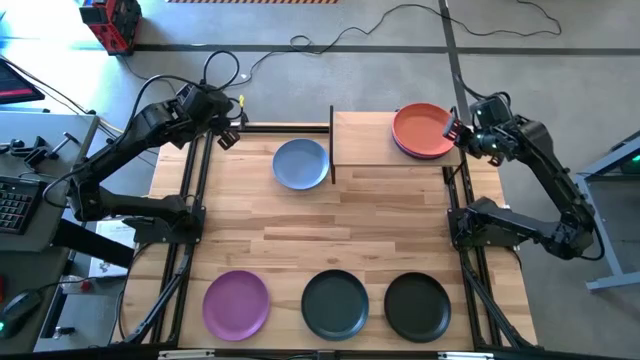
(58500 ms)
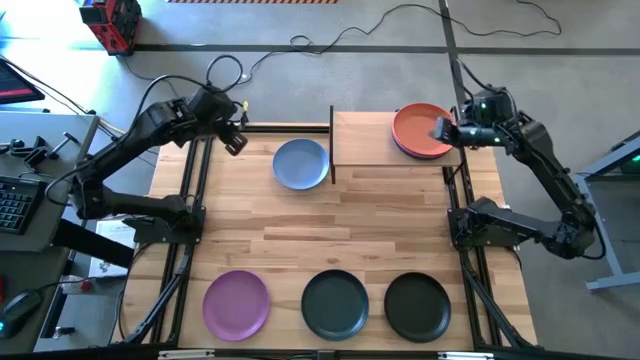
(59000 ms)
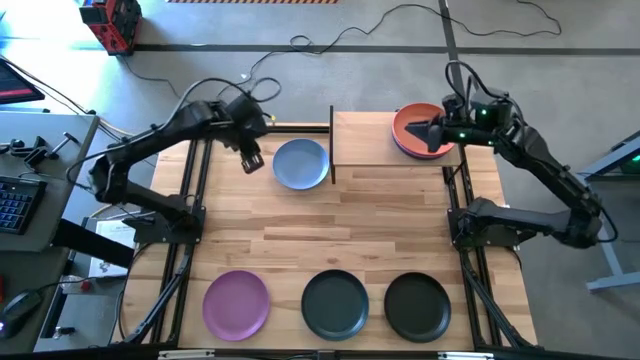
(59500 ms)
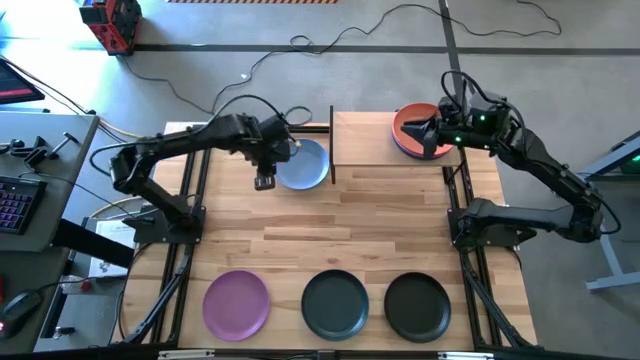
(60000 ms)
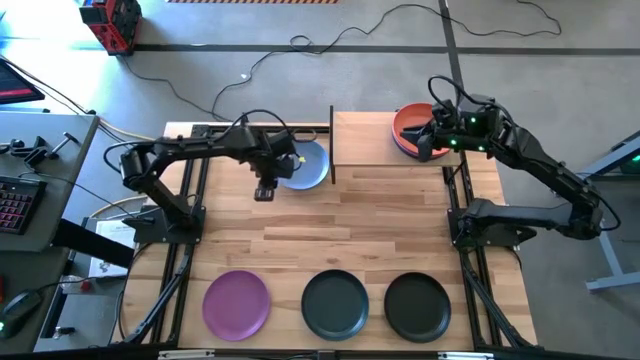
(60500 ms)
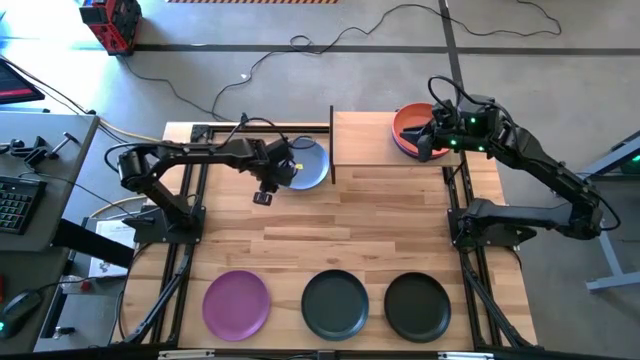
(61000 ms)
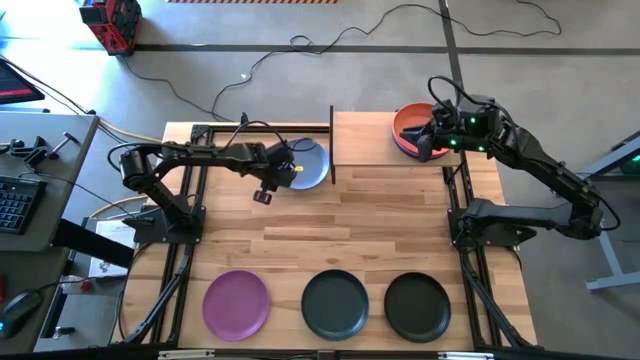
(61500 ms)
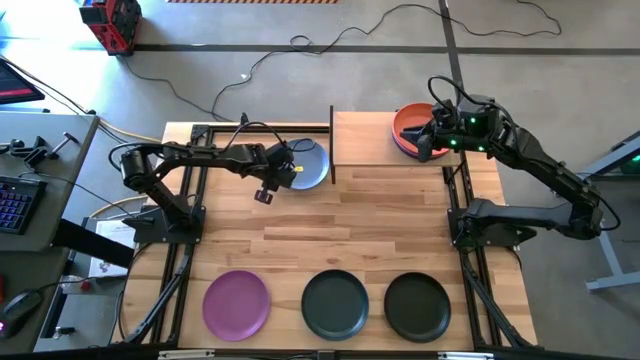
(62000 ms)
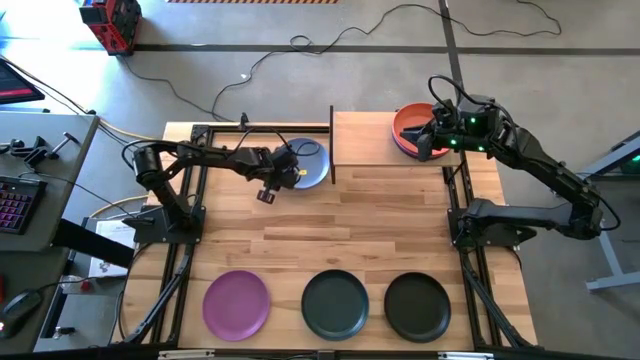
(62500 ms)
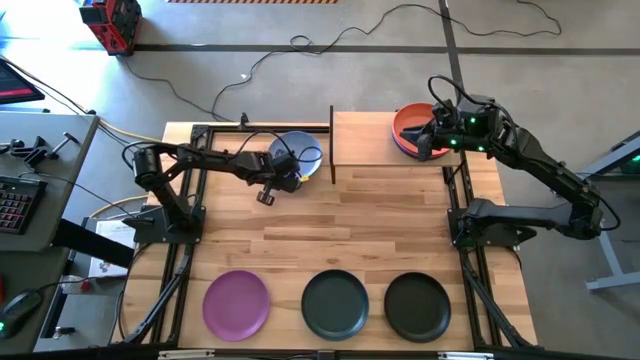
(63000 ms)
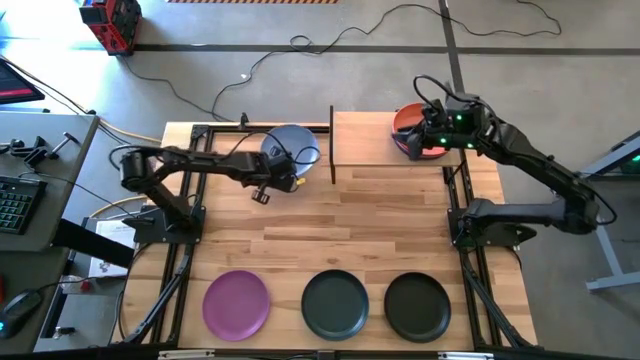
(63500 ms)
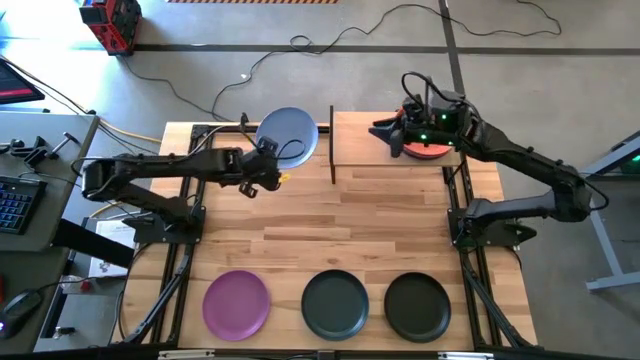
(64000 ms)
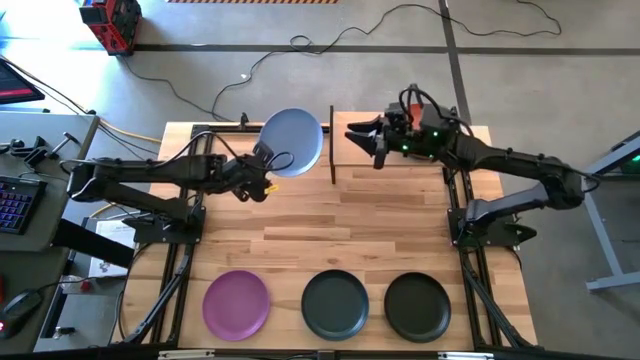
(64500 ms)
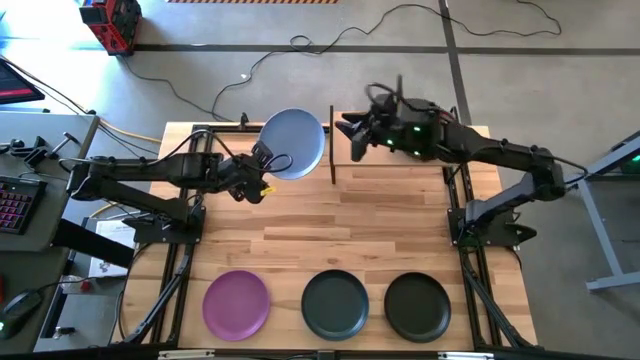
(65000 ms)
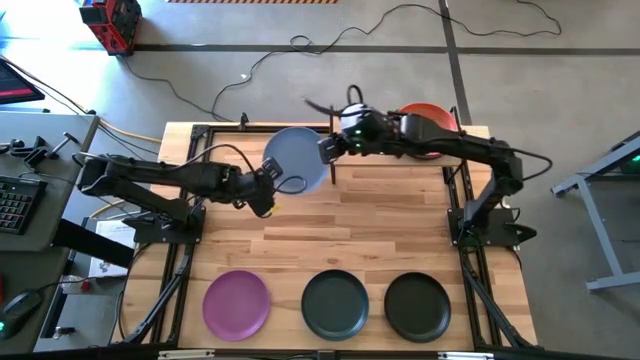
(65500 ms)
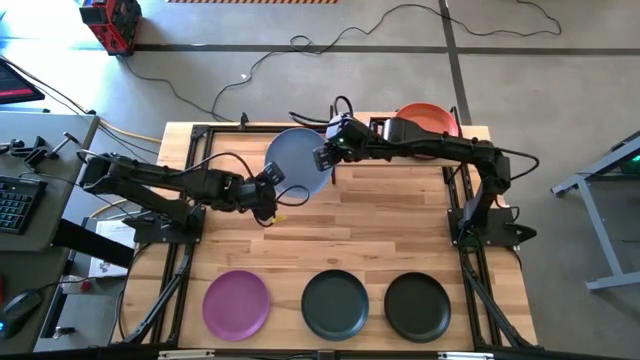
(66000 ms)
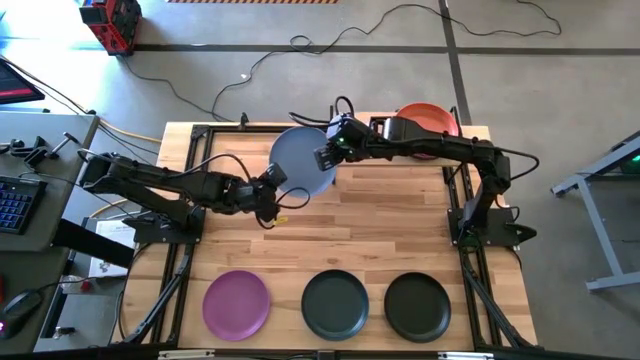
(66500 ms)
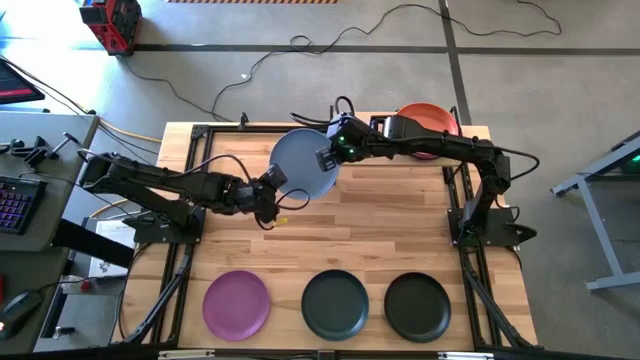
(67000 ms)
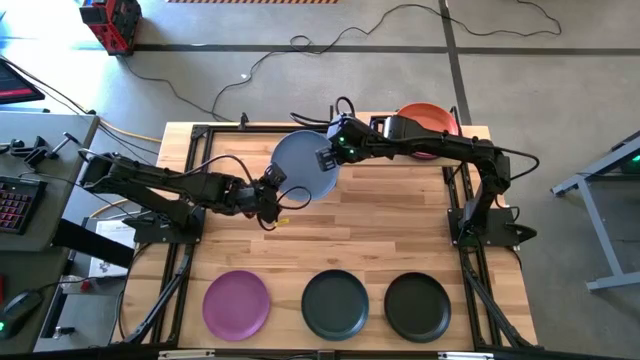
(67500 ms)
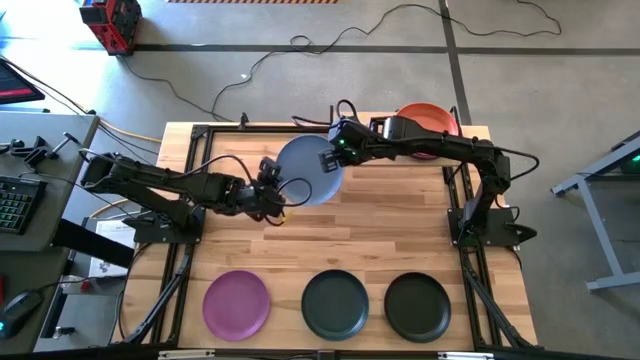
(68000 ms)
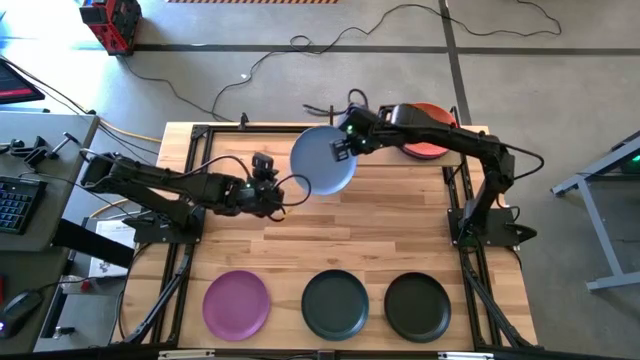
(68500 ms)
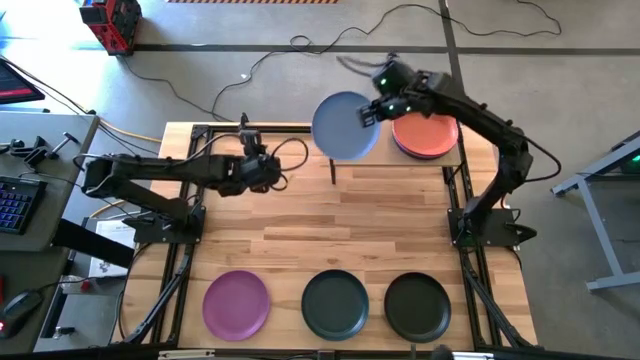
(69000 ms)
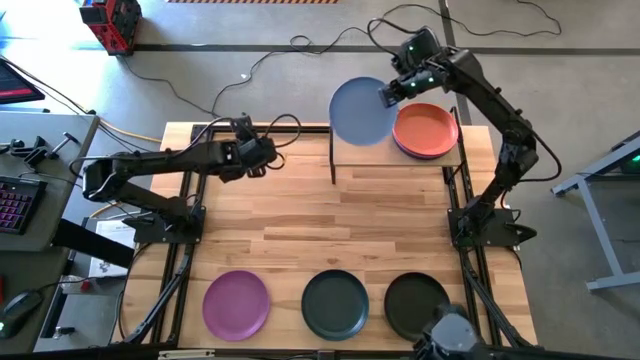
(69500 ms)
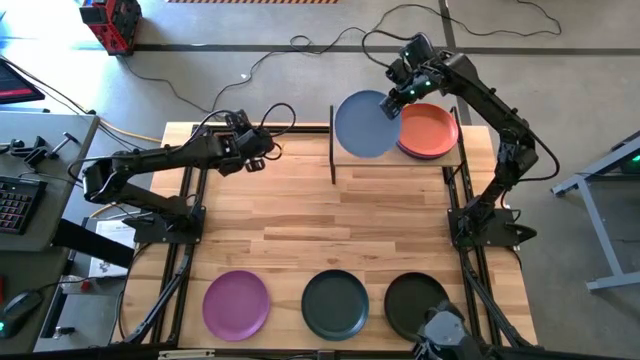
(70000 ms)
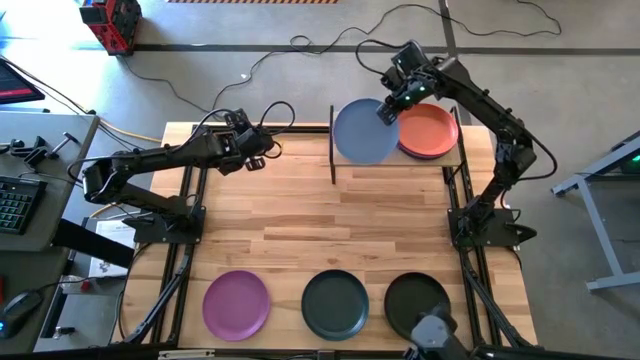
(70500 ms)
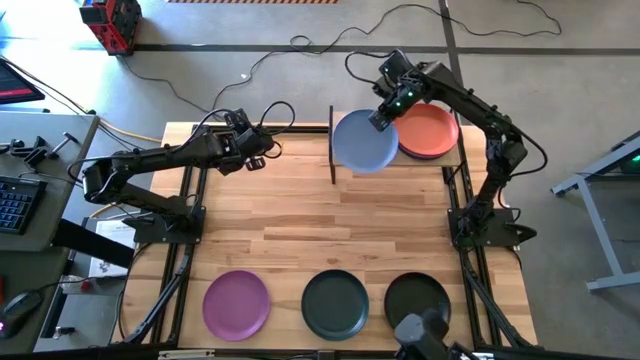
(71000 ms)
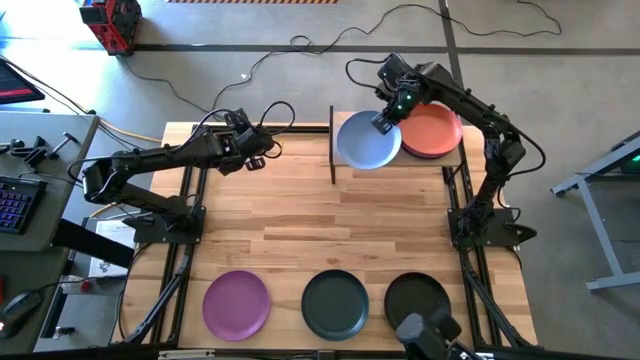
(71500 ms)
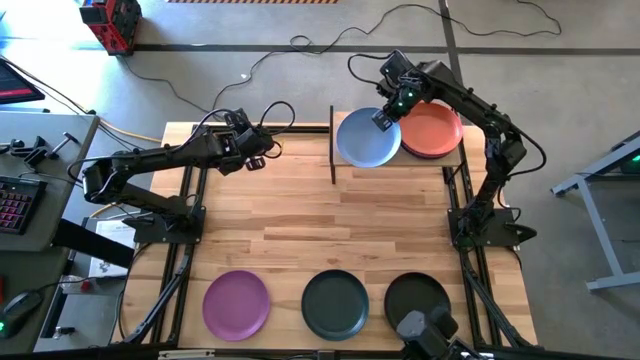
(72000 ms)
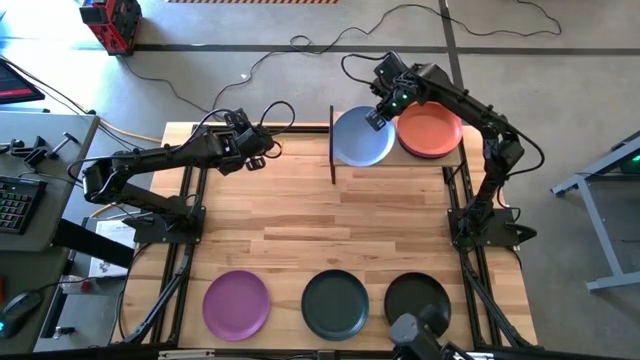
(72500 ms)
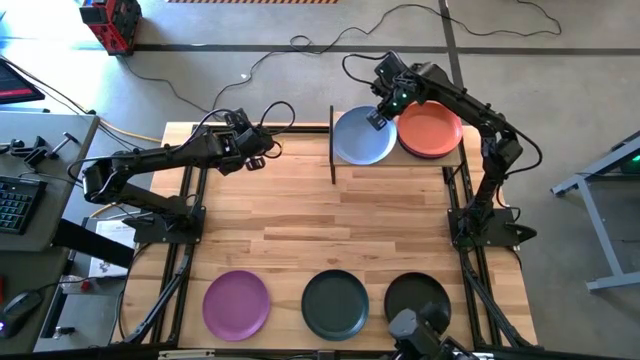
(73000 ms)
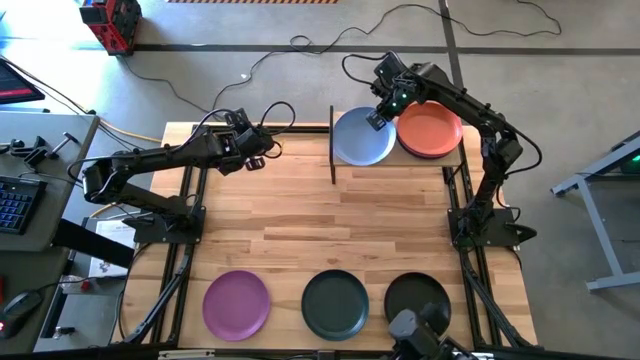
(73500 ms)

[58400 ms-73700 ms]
Task: Place and stack plates onto a shelf
Put the blue plate on the shelf

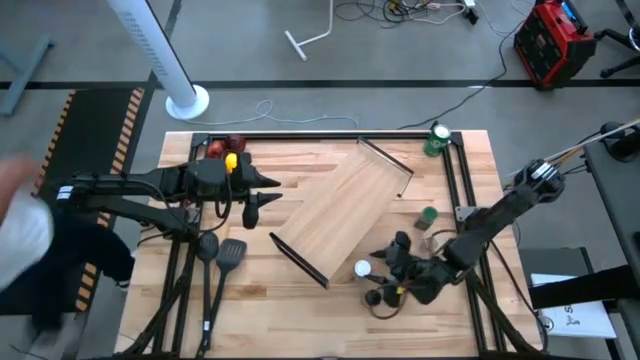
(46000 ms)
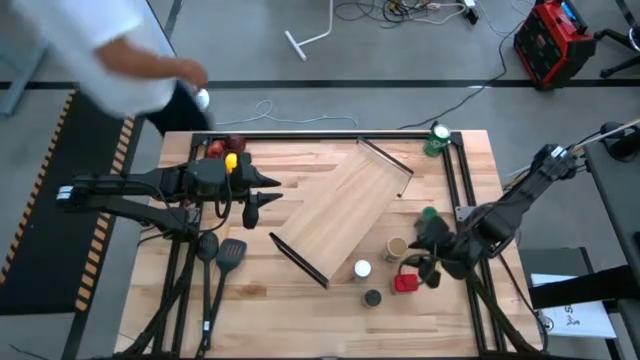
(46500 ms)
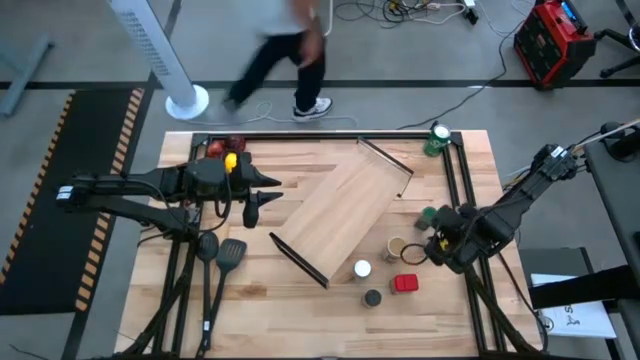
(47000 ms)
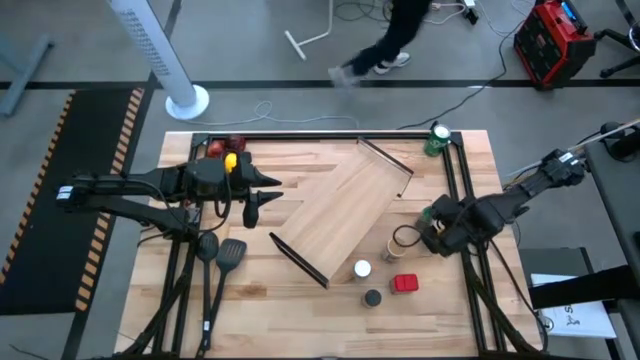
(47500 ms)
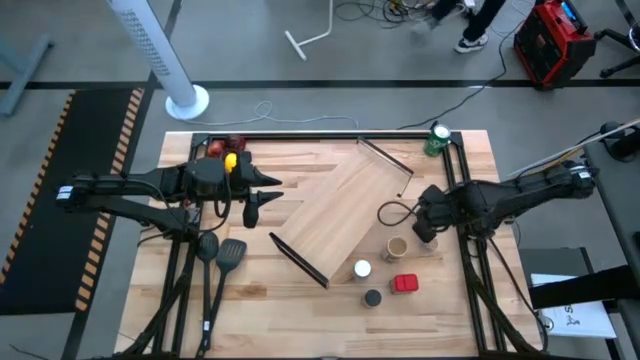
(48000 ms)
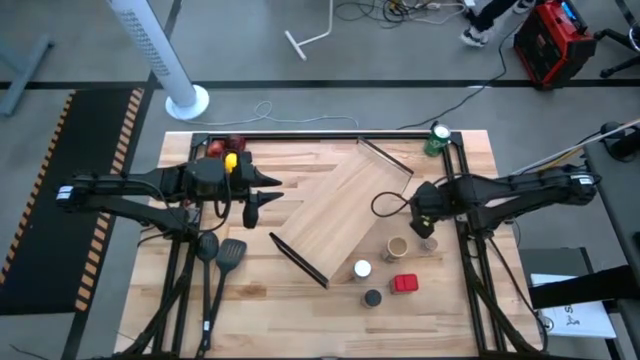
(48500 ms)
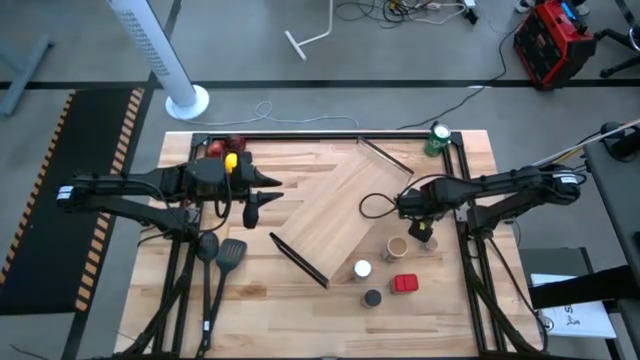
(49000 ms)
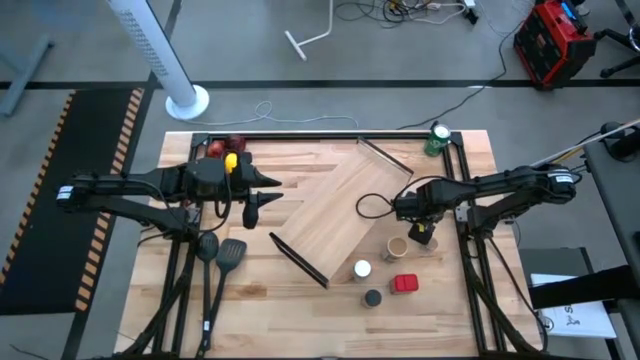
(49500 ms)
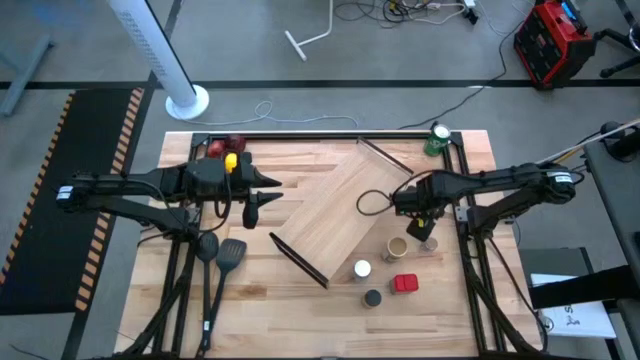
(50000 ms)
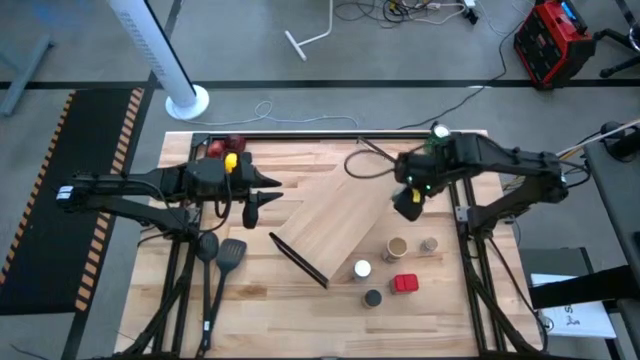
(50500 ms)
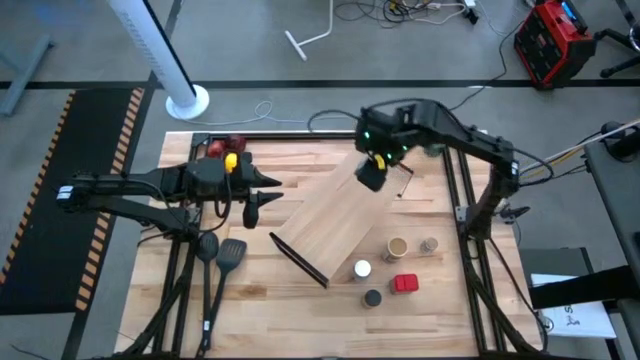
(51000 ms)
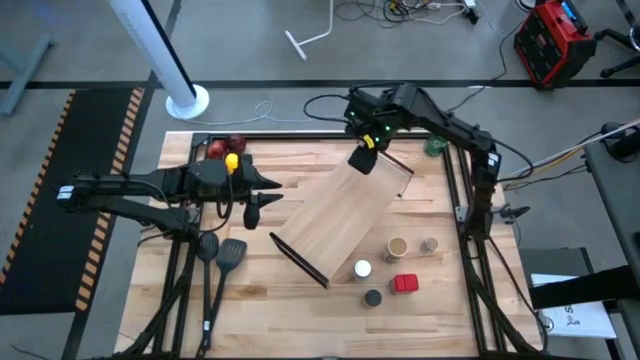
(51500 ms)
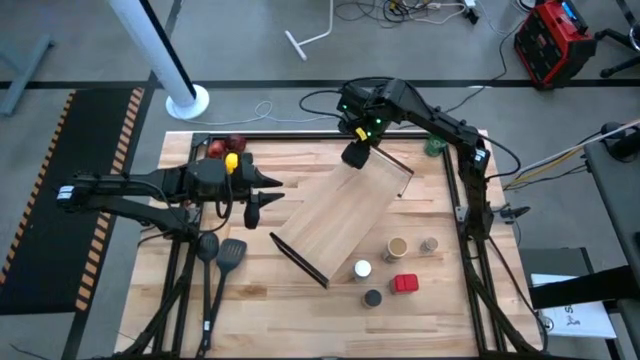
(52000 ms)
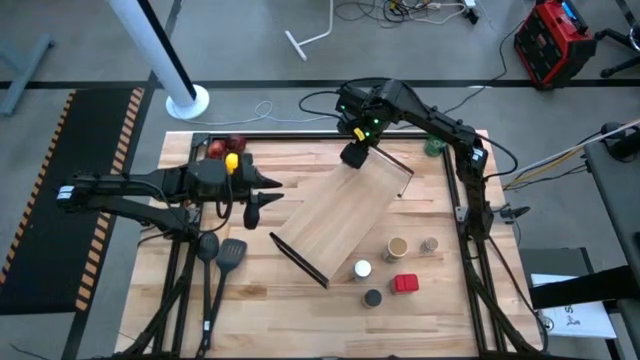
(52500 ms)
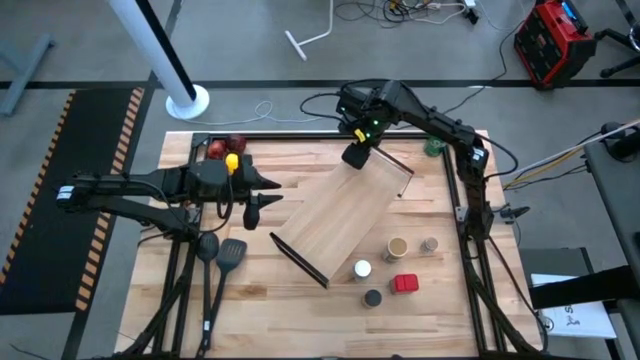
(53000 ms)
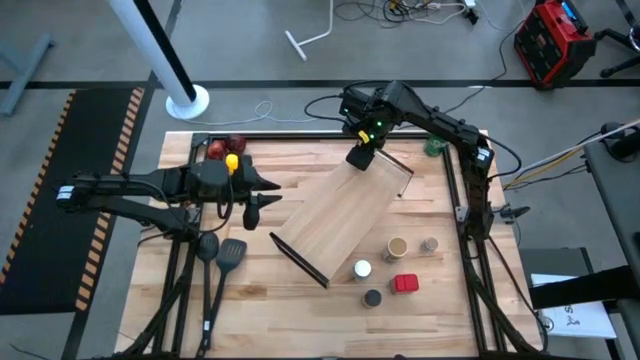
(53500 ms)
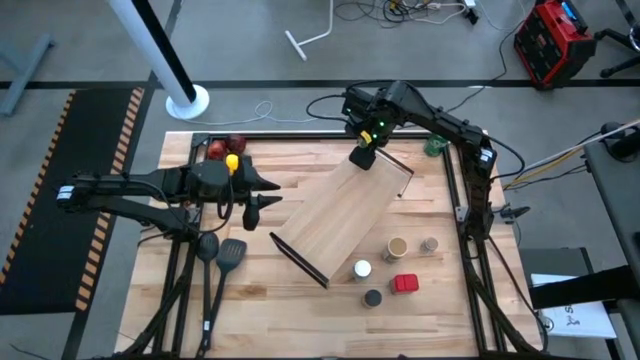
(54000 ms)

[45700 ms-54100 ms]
Task: Shelf spices
Put the green seasoning bottle on the shelf
